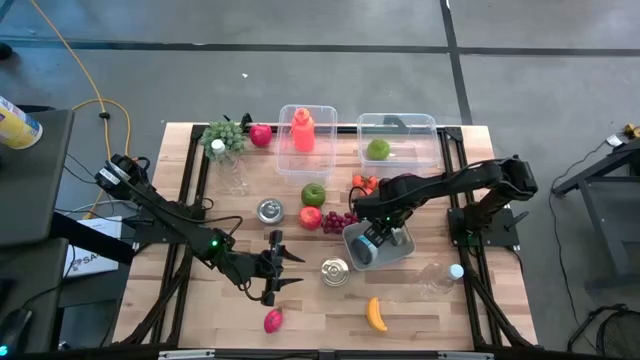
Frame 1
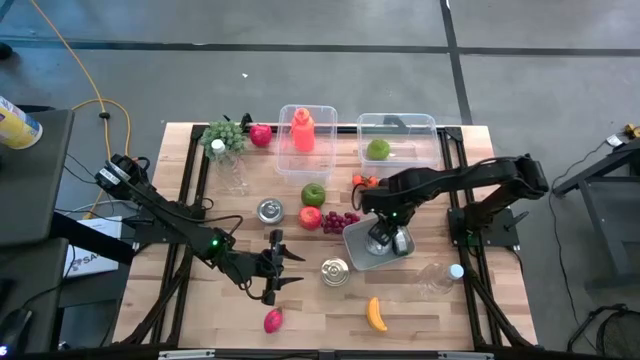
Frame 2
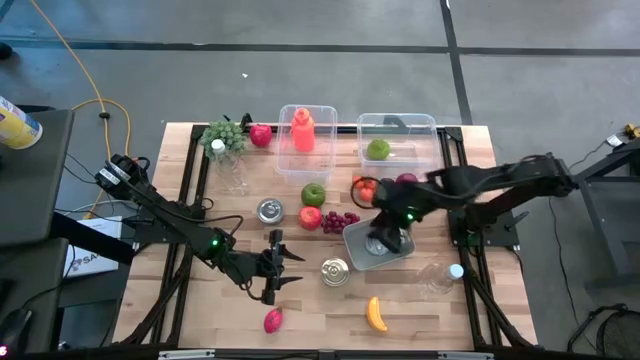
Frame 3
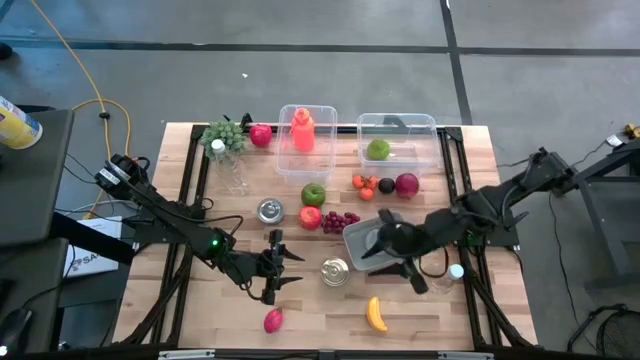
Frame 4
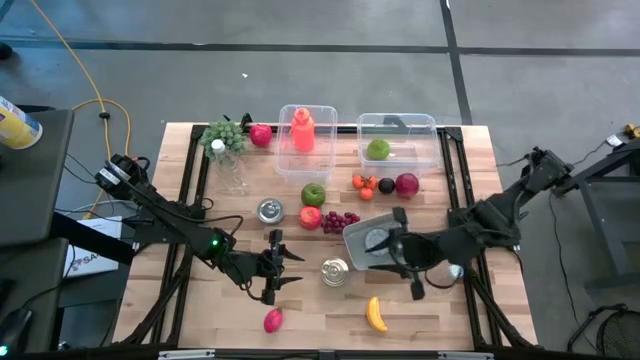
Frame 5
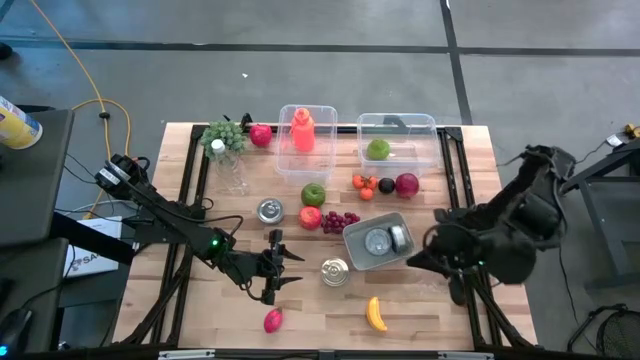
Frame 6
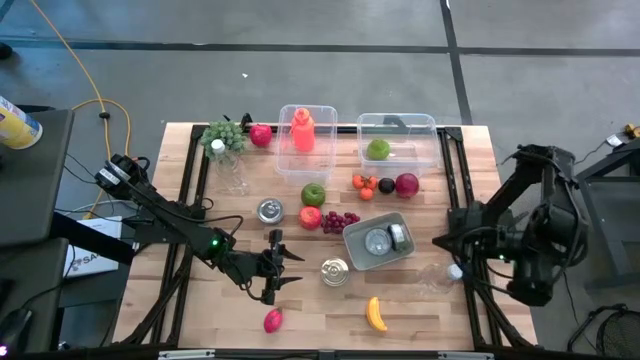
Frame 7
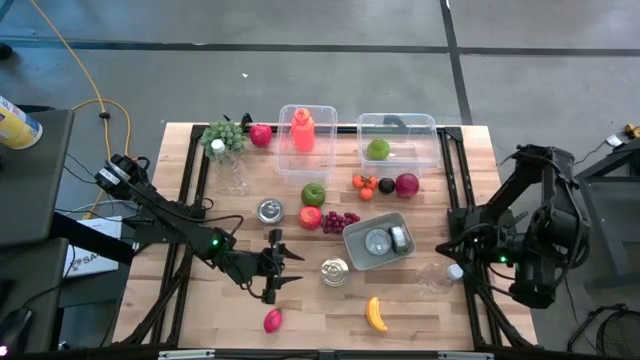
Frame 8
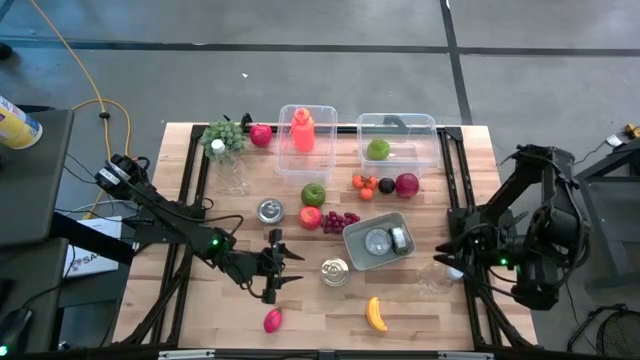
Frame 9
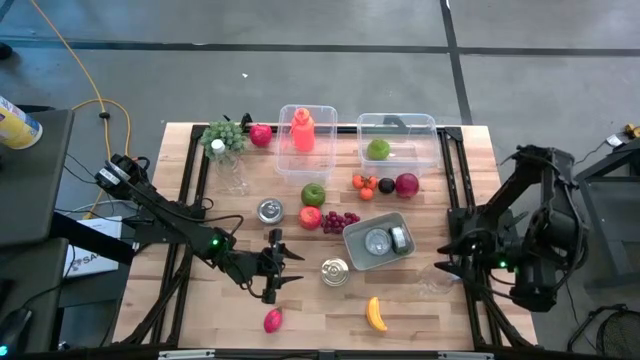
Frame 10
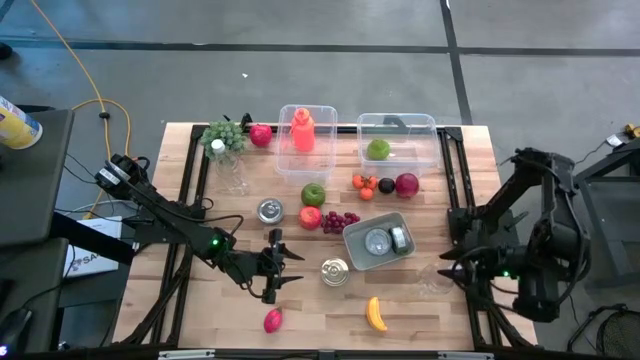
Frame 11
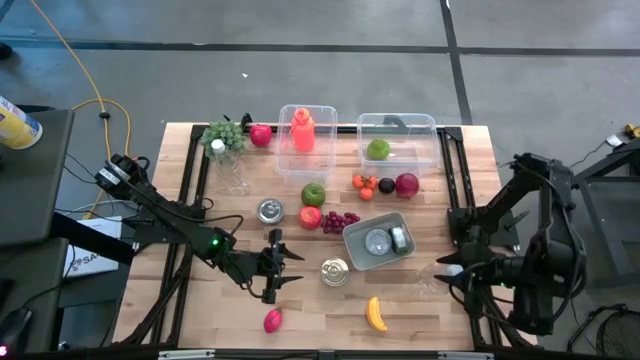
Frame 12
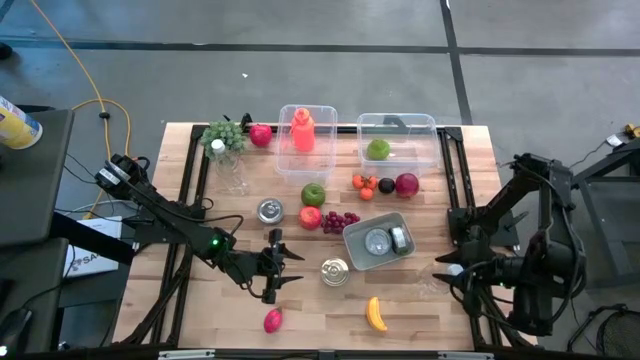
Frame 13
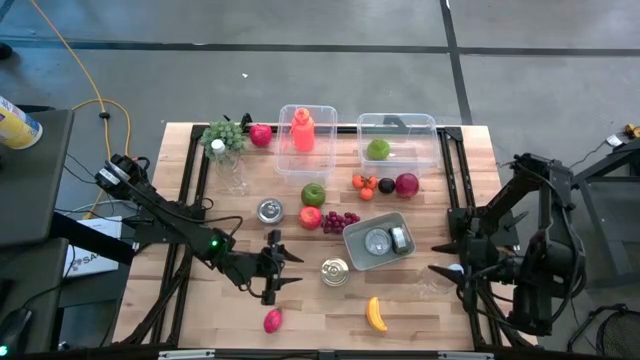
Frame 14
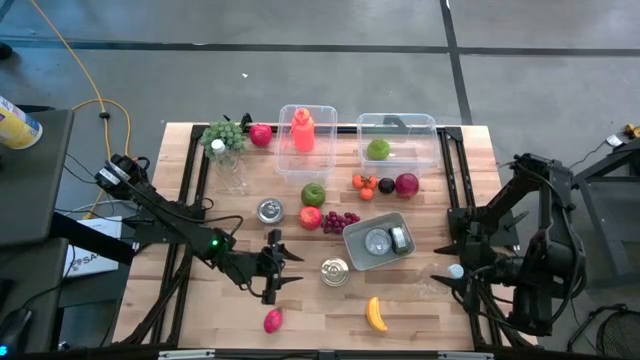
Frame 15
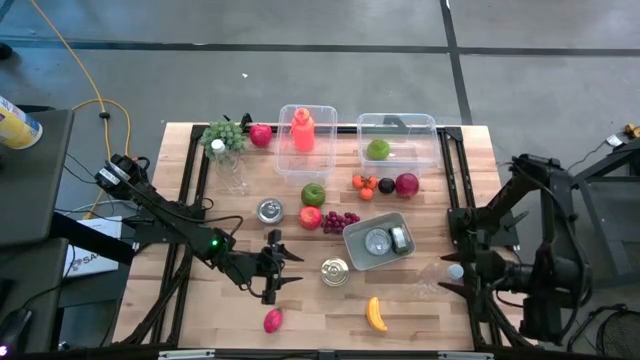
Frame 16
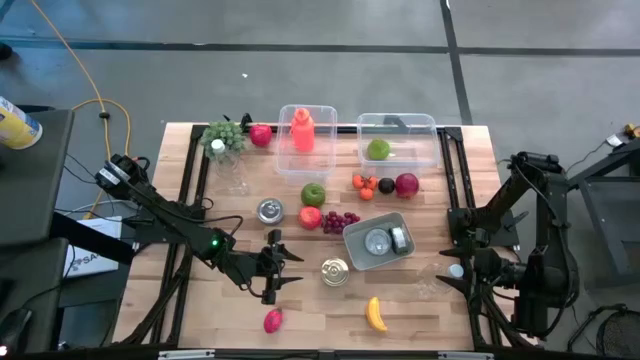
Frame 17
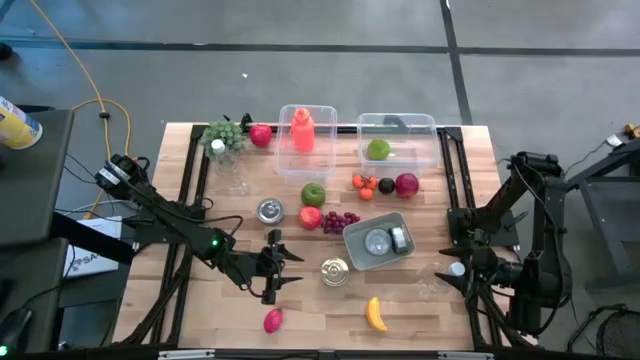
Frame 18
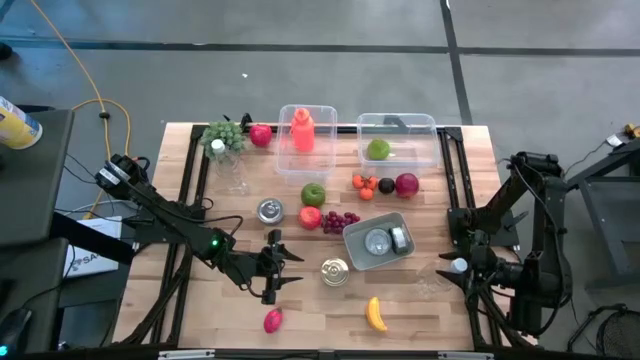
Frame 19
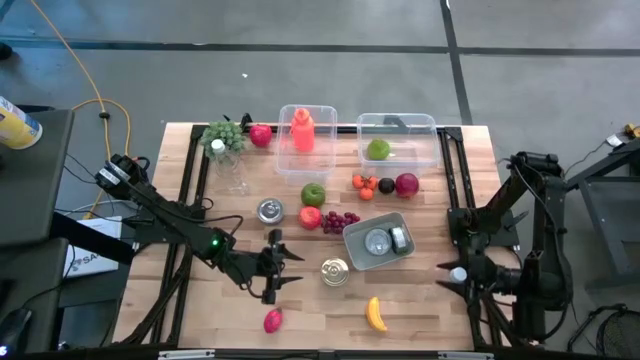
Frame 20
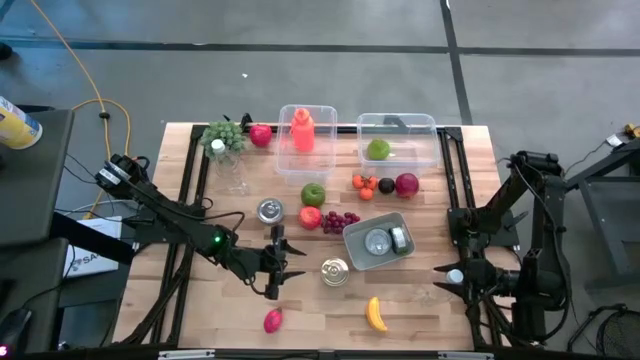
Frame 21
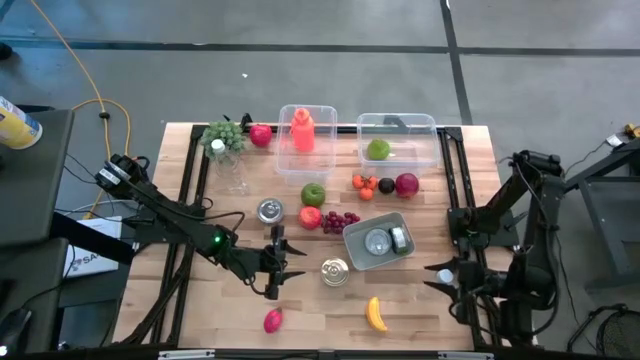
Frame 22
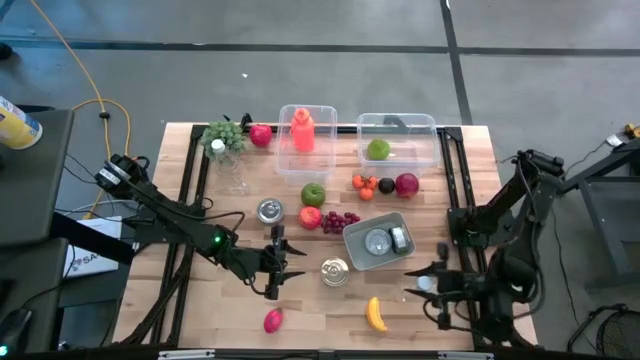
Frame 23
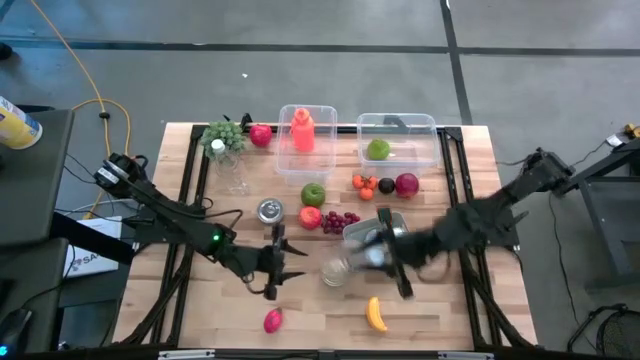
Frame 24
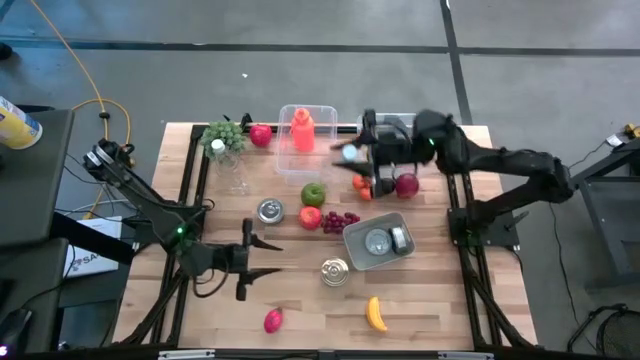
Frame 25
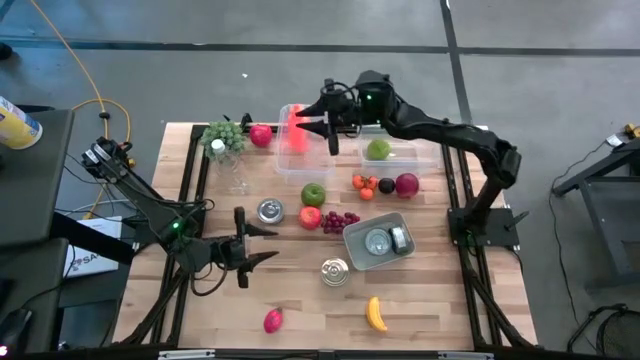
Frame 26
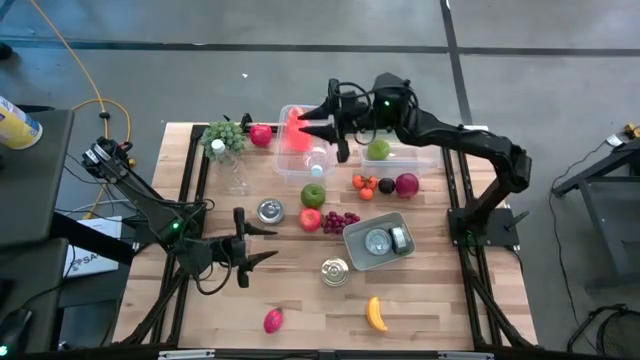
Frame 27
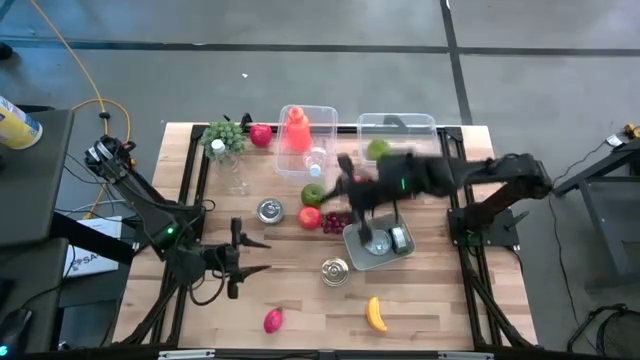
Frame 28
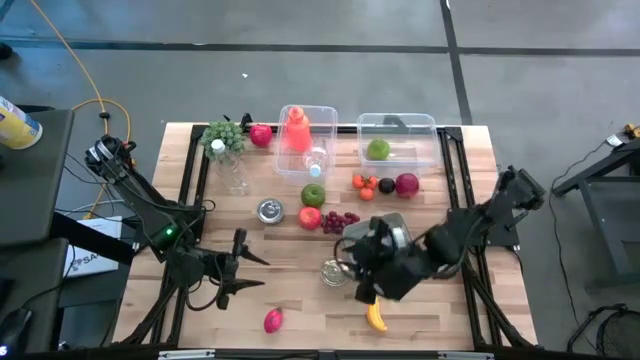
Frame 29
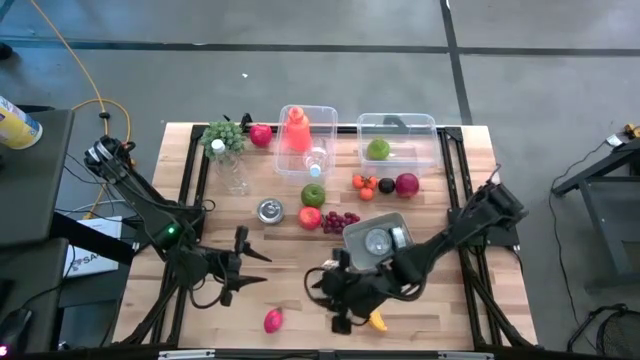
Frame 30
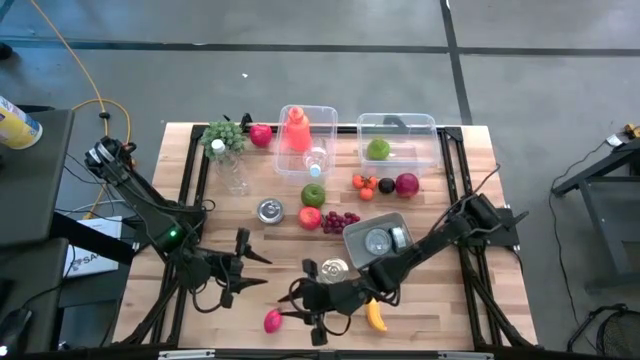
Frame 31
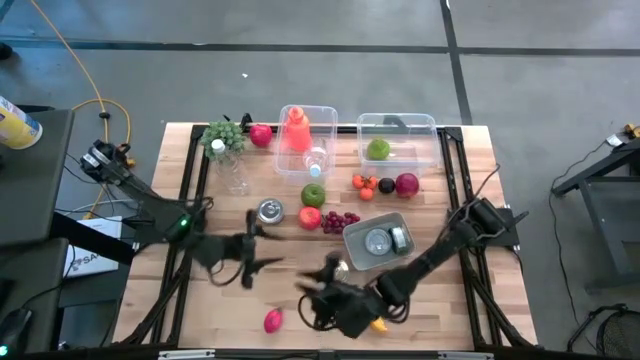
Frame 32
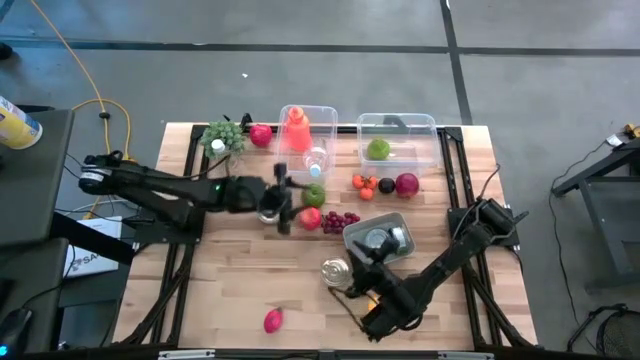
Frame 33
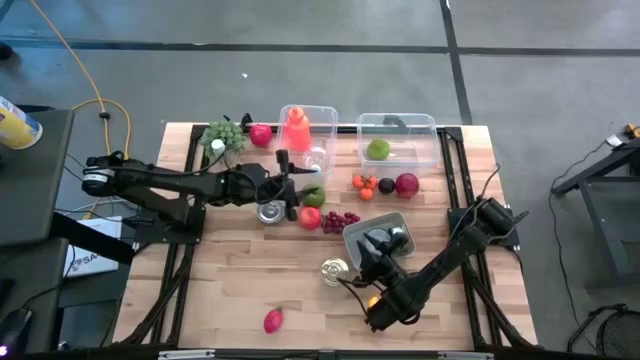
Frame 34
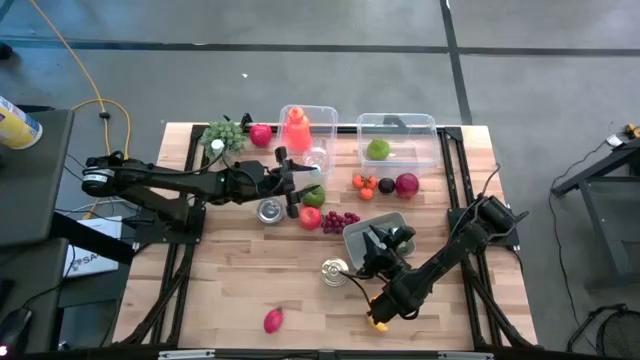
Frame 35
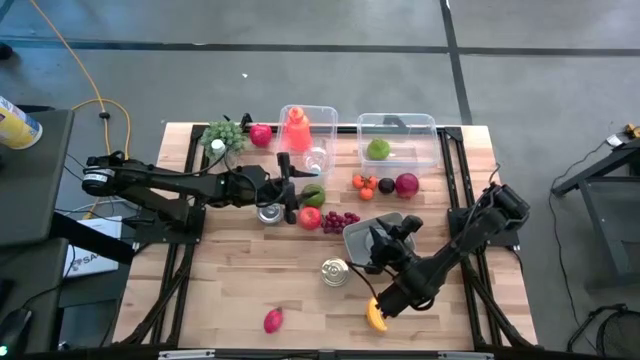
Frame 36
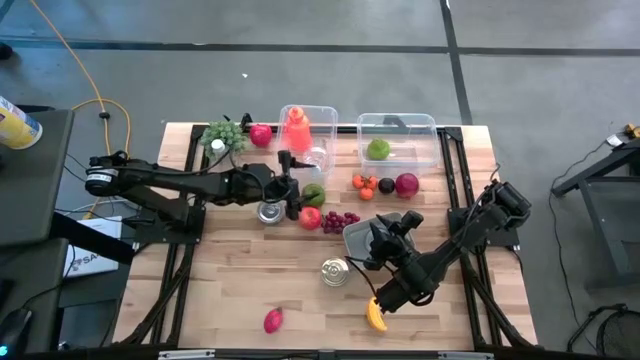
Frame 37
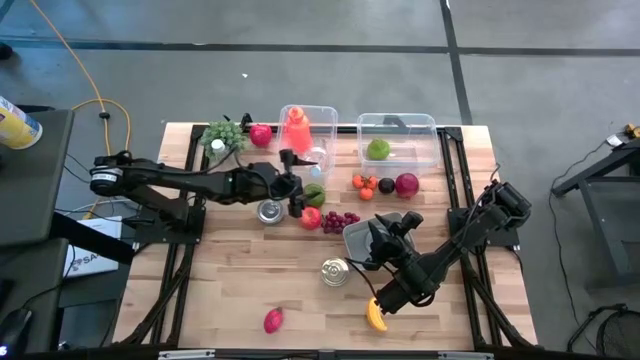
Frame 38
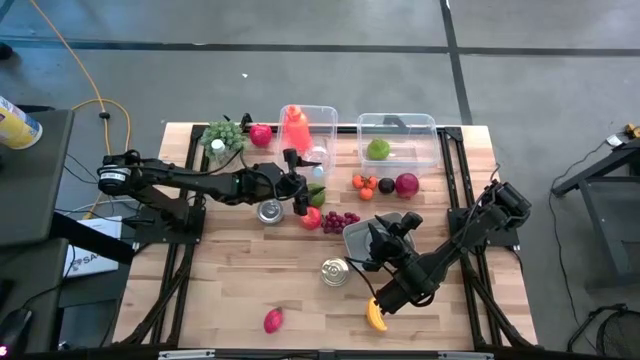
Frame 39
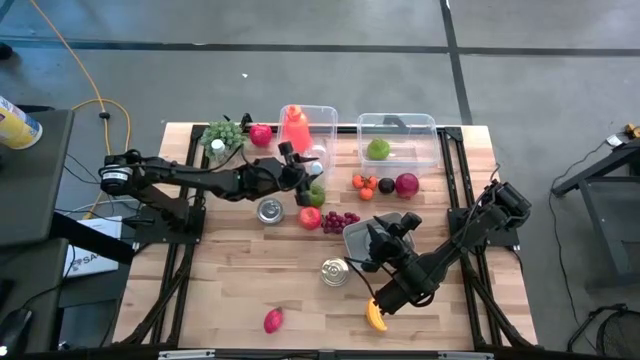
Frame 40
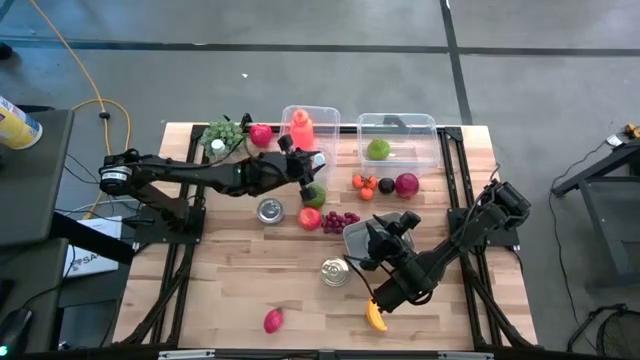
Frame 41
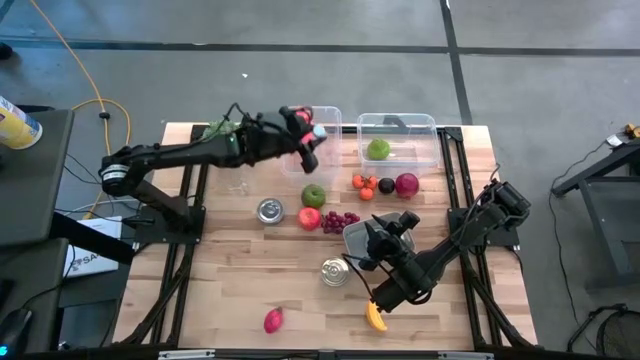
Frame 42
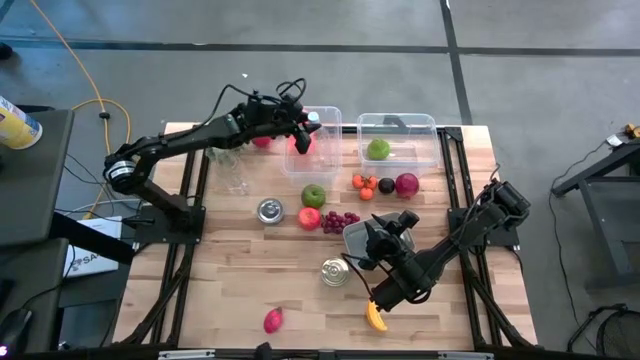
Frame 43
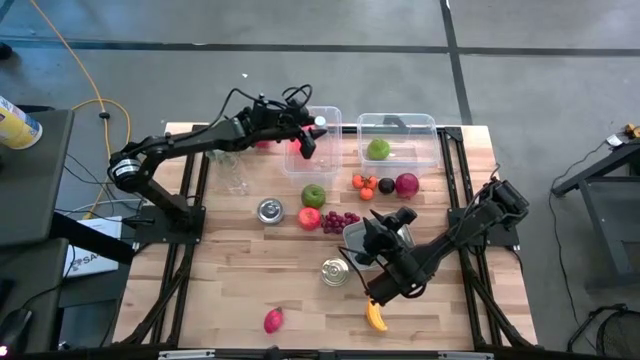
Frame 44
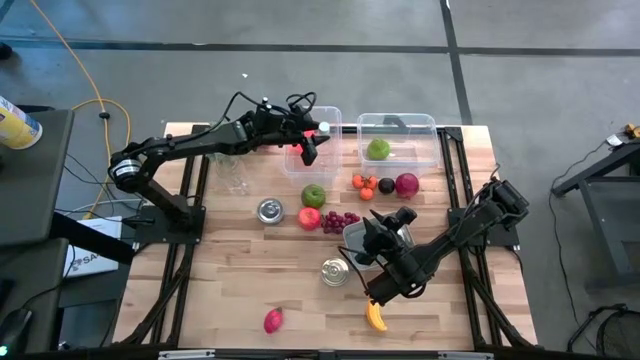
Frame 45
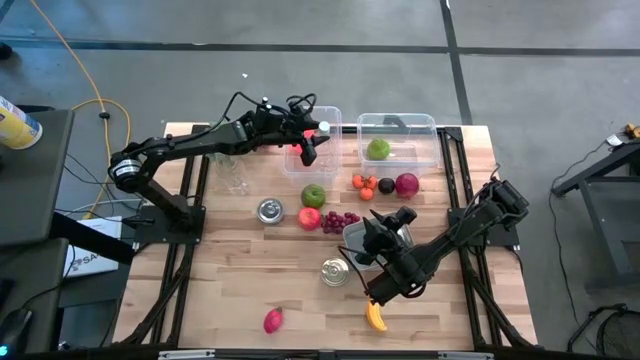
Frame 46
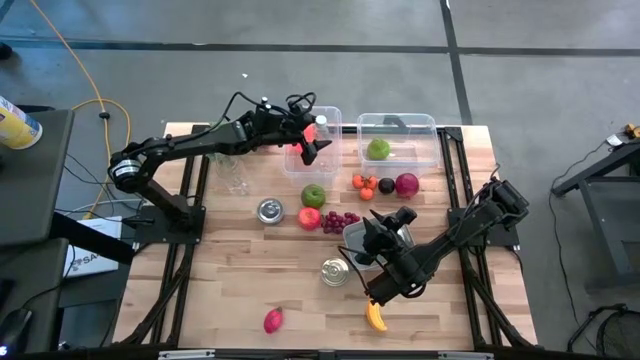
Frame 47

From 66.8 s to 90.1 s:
Task: Pick & Place Food Item
Put the bottom transparent water bottle into the left transparent bin
